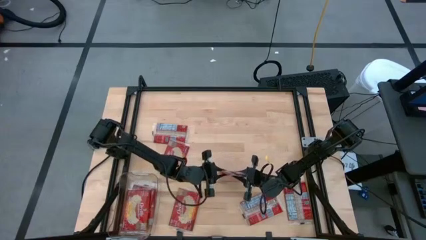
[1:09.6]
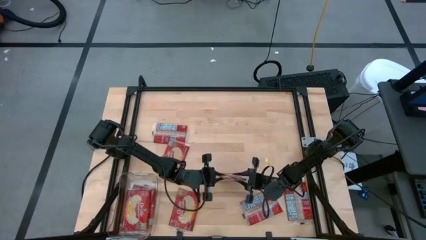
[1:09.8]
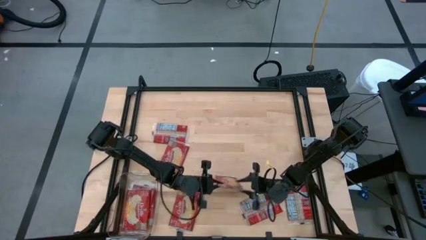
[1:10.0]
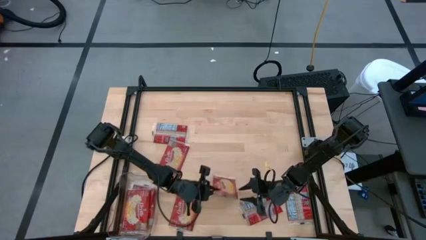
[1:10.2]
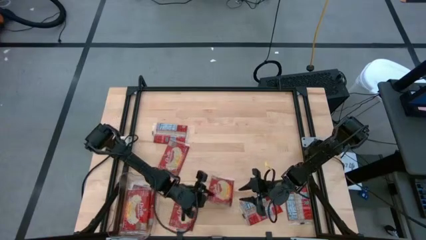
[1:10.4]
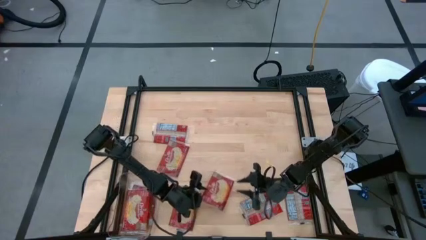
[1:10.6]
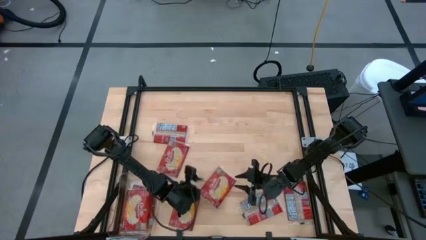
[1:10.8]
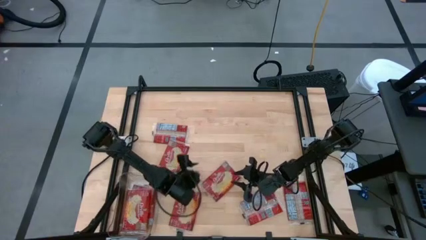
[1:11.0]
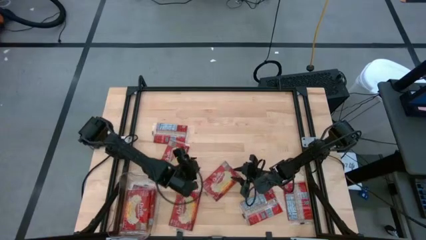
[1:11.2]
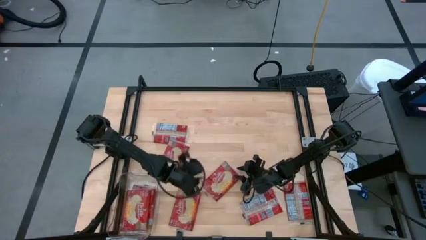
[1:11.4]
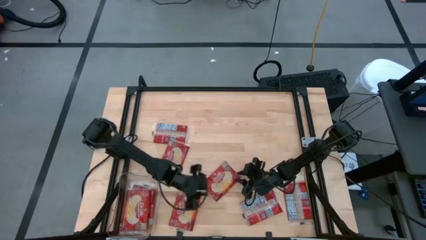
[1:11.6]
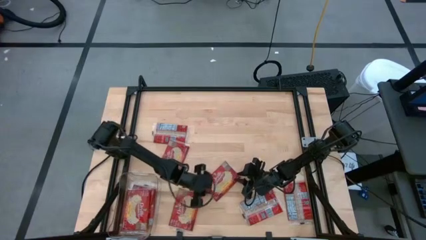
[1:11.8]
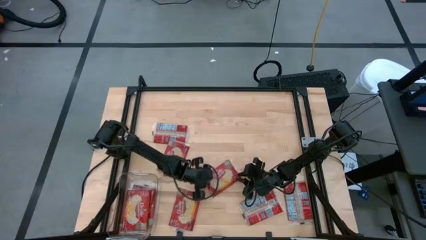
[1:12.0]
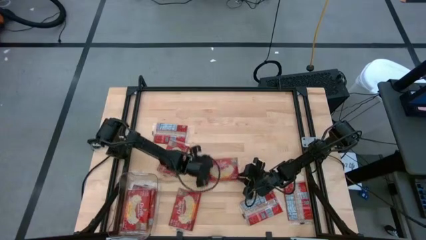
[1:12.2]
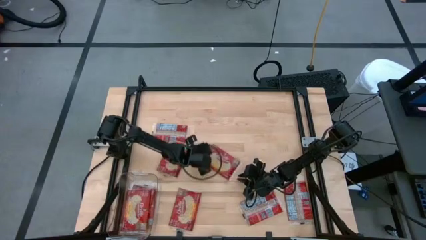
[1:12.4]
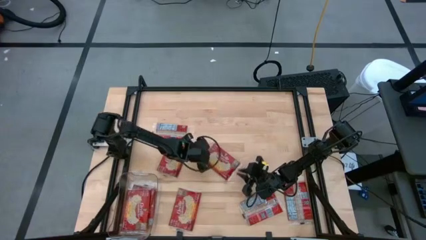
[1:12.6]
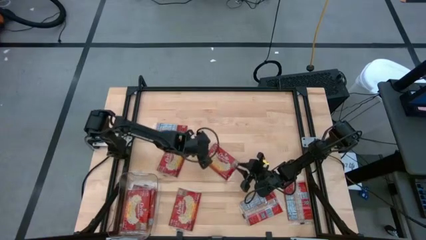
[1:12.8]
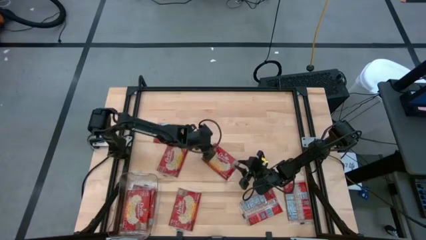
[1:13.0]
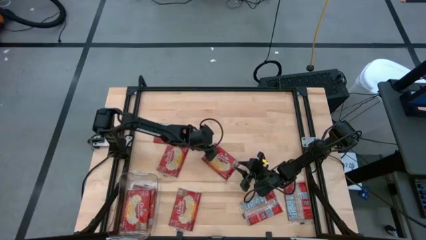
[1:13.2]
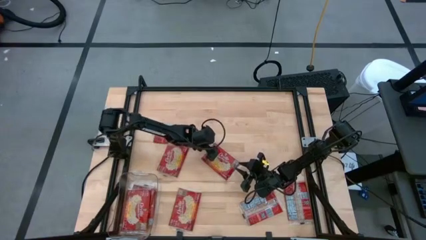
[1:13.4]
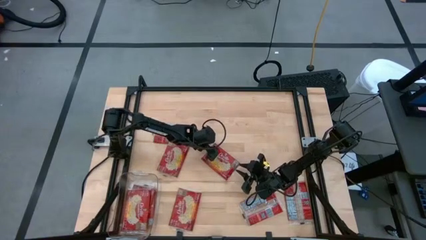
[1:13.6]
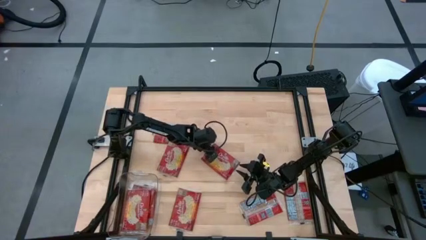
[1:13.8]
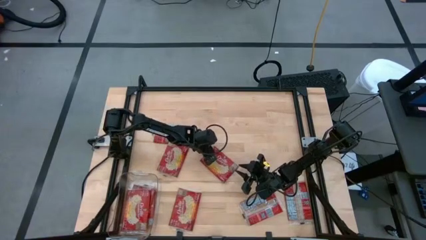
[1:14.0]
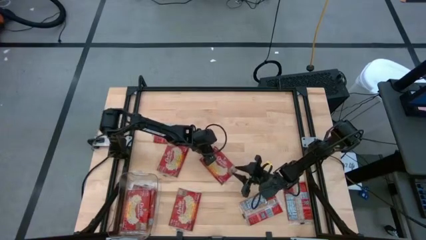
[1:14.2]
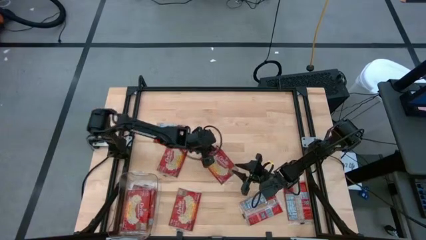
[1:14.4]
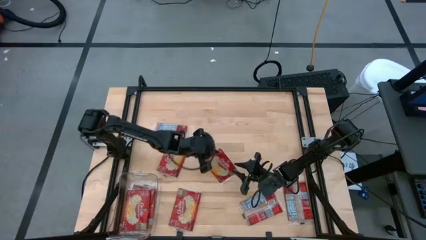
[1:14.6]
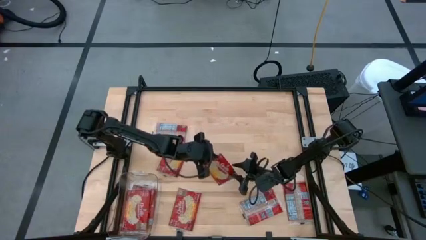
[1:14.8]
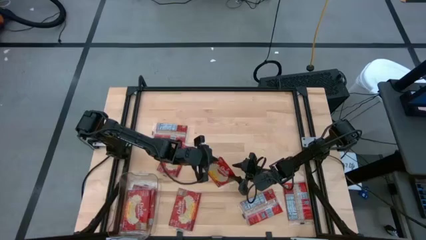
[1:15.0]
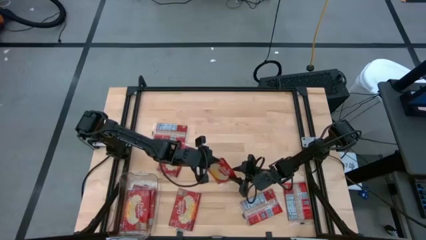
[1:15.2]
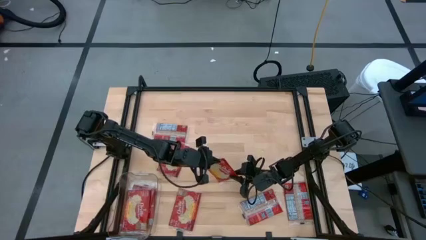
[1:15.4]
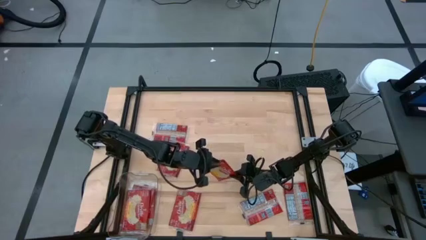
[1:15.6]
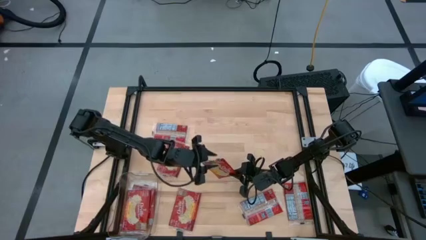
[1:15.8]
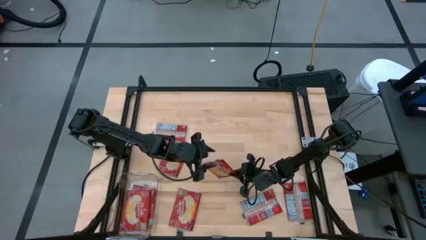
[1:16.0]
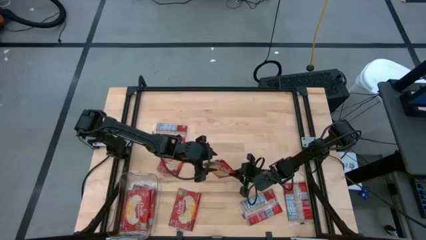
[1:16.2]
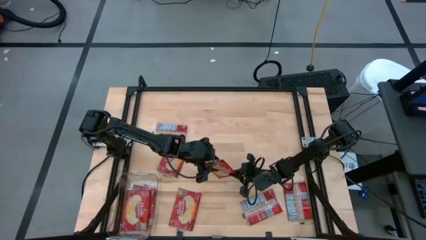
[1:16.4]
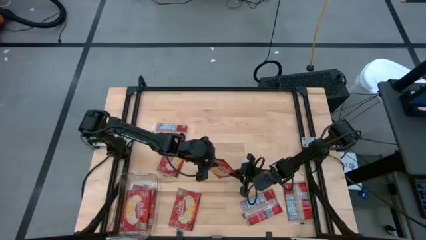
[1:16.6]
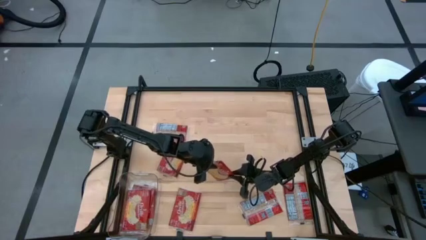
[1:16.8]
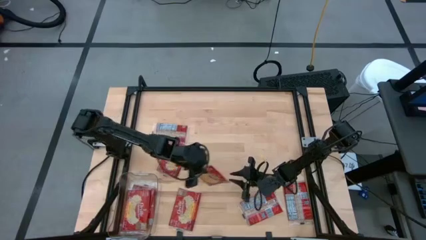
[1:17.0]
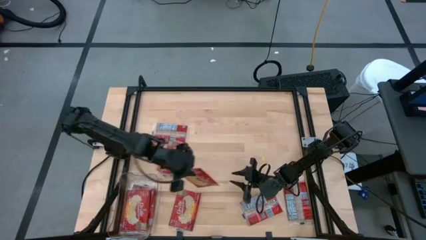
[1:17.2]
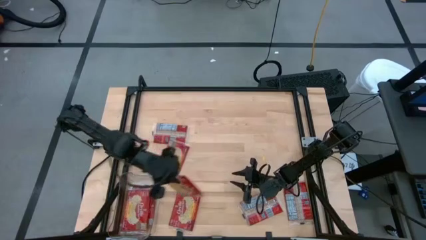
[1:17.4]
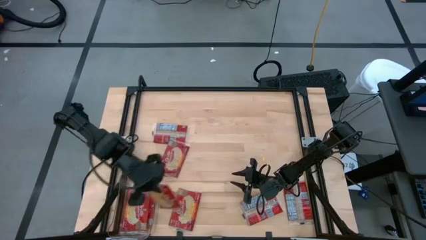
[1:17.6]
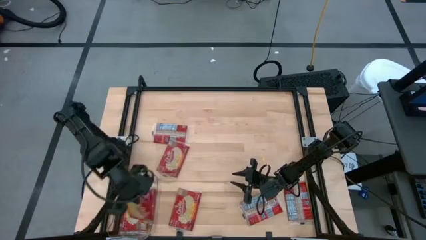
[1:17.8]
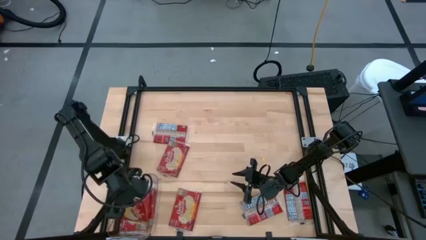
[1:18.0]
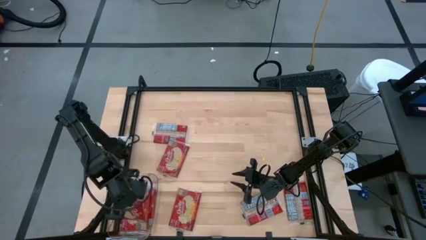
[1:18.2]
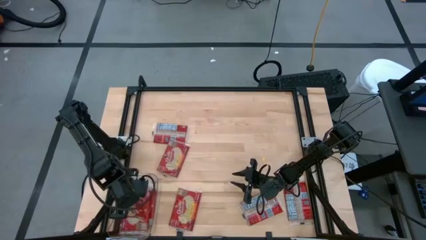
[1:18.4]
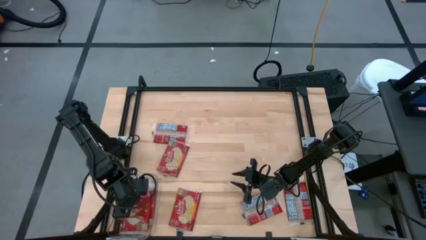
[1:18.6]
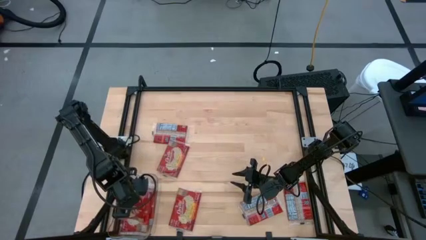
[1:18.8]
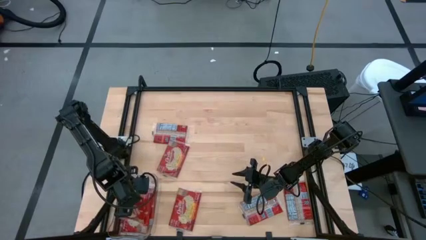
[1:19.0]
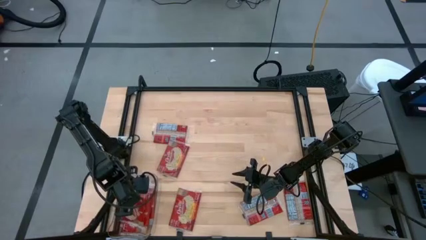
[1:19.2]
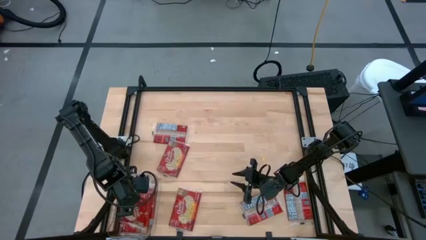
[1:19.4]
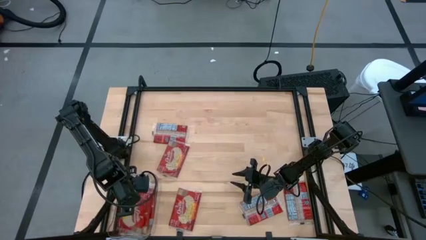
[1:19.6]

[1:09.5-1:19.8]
Task: Sort popcorn bags into baskets
Put the popcorn bag into the transparent bin

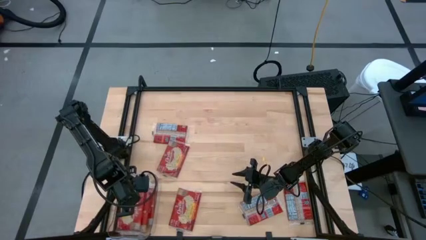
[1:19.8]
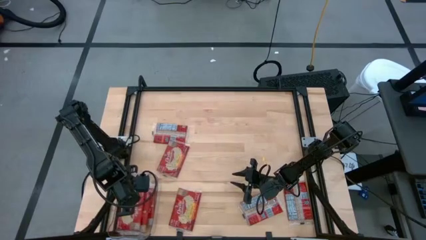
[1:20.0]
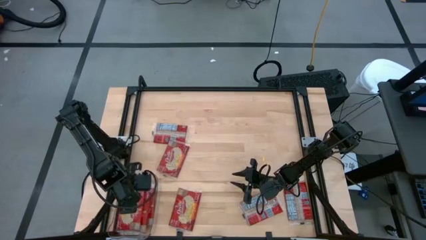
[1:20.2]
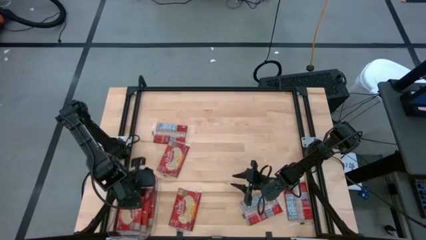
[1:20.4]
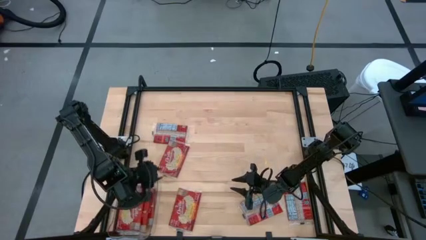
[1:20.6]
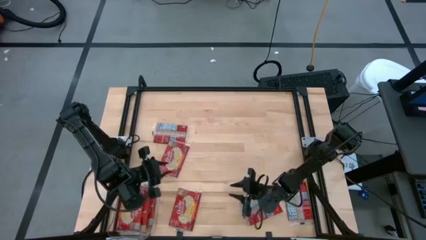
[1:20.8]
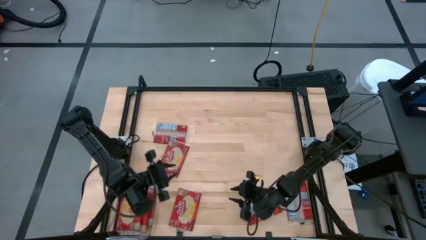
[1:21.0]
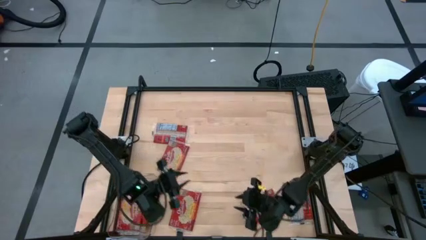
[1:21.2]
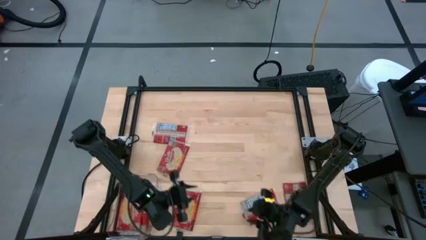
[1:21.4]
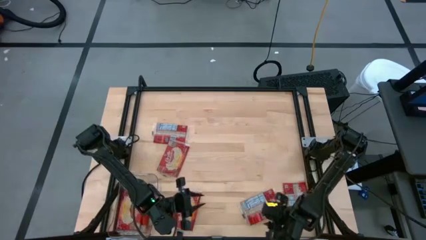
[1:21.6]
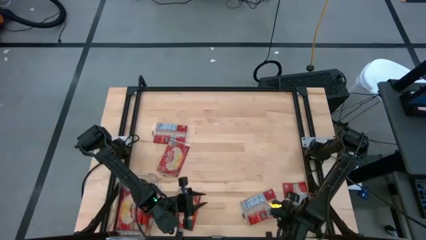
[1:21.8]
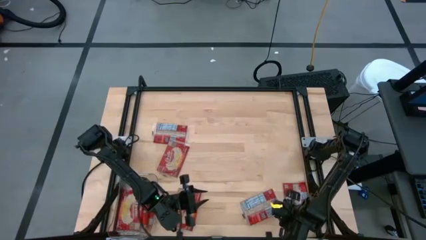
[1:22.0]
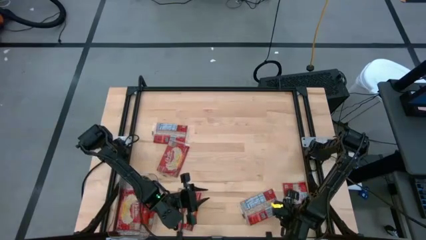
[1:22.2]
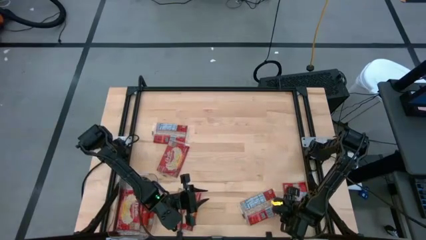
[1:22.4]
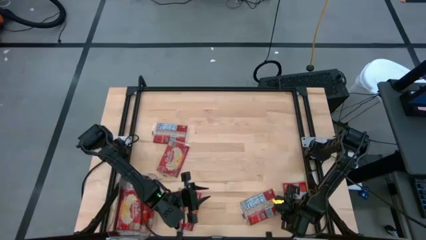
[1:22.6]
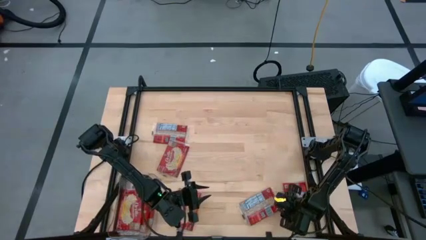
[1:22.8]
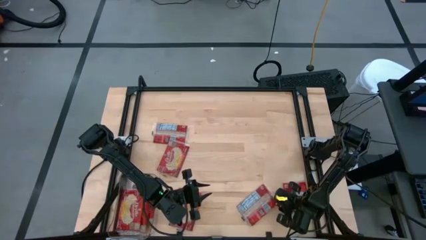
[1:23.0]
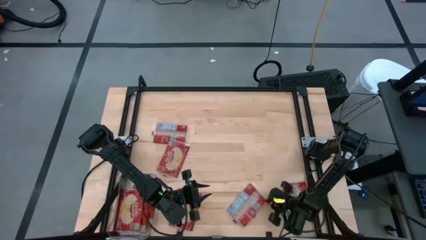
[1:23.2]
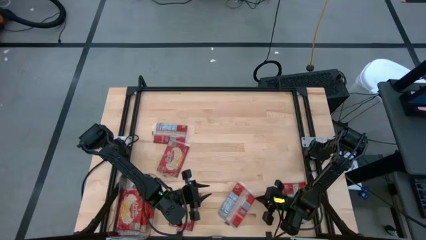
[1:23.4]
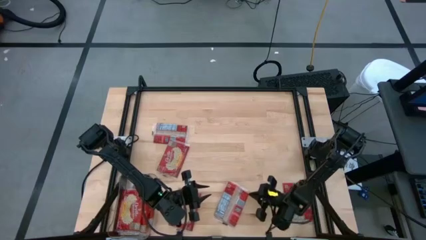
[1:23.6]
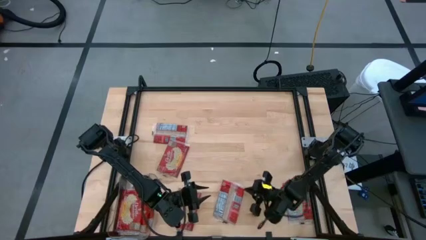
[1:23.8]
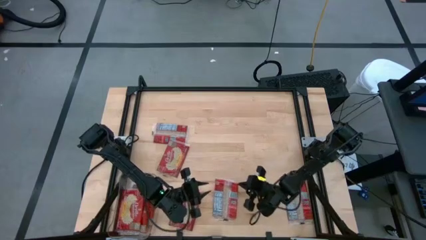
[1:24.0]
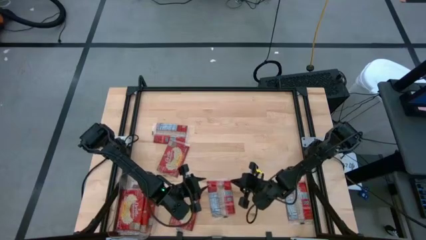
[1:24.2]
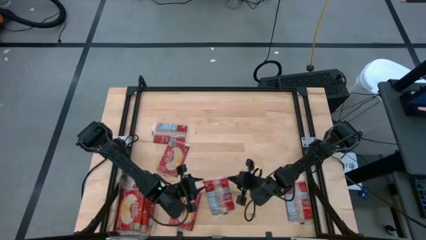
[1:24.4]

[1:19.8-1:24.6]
Put the popcorn bag into the transparent bin

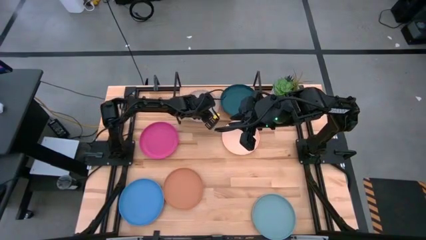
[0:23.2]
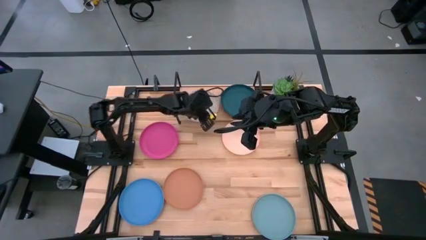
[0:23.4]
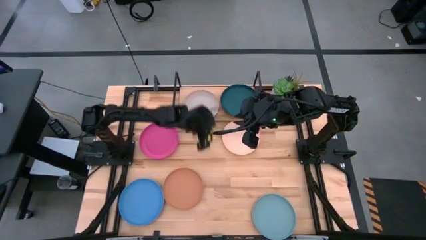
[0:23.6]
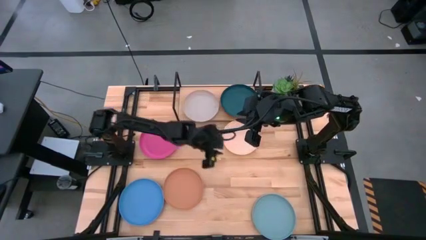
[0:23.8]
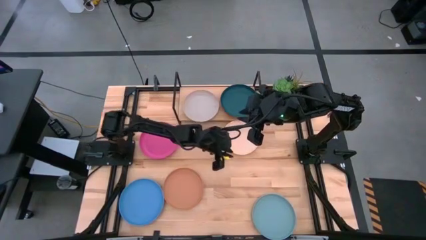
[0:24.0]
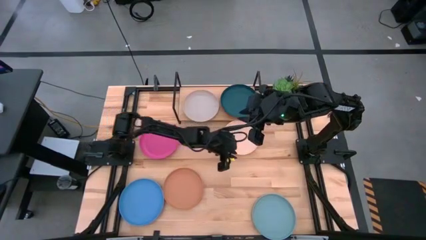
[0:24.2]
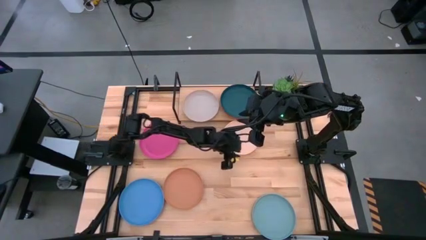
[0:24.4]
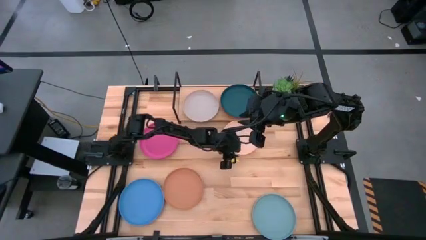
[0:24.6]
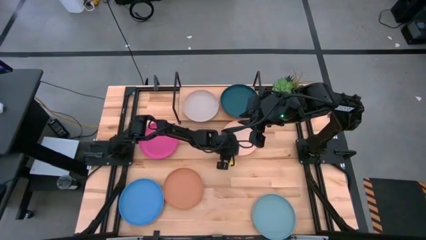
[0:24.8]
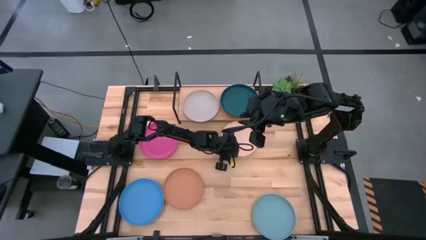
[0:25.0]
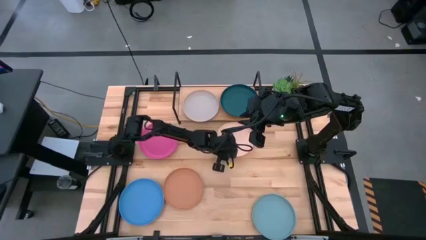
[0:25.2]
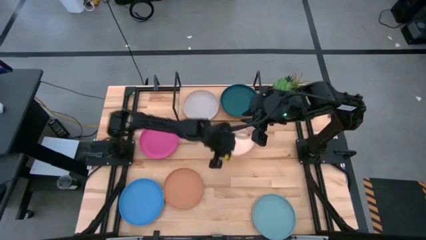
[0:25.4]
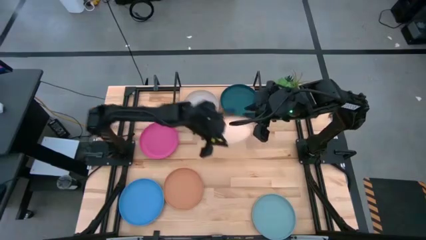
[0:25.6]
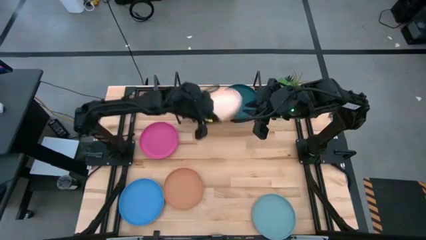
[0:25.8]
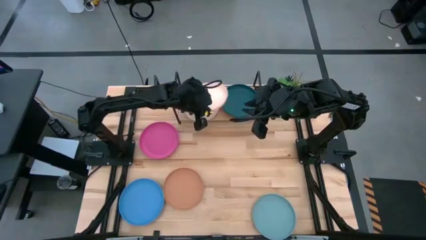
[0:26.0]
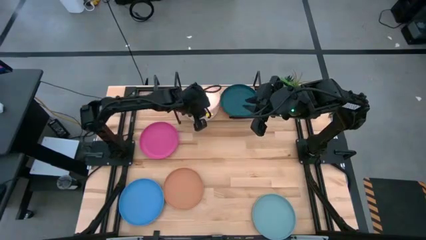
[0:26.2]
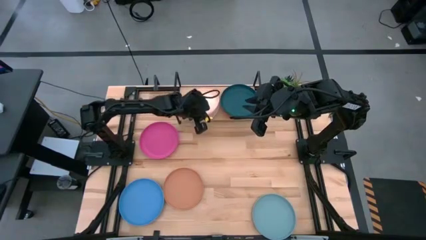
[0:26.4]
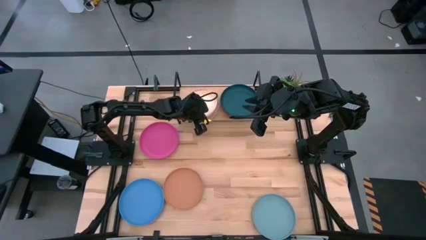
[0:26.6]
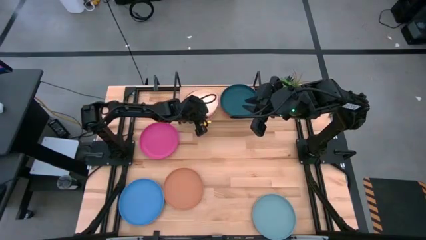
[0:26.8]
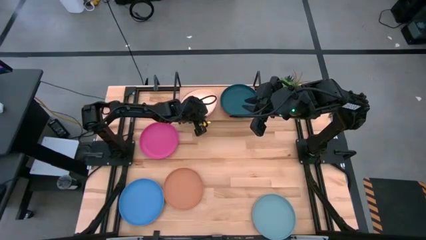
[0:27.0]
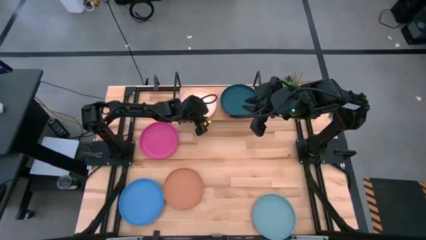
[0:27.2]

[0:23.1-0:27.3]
Task: Place and stack plates onto a shelf
Stack the light orange plate on top of the gray plate on the shelf
